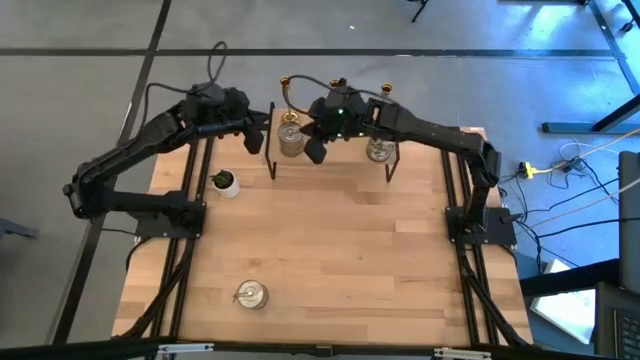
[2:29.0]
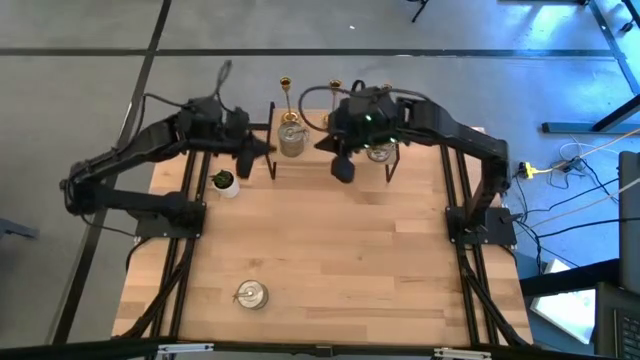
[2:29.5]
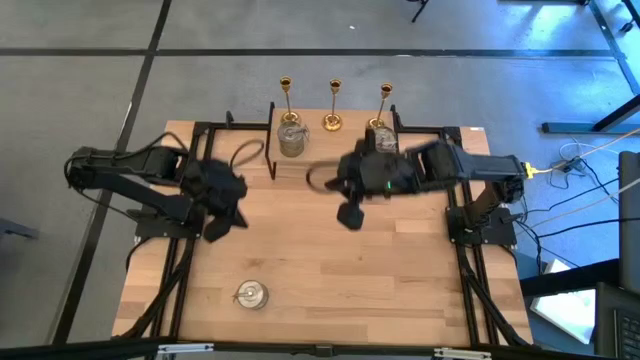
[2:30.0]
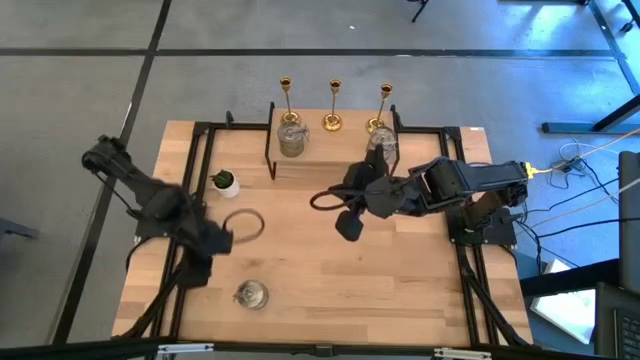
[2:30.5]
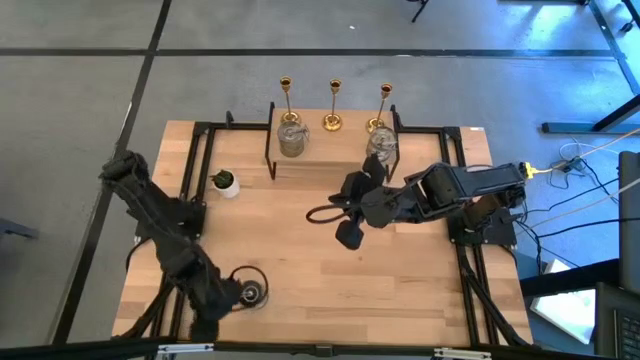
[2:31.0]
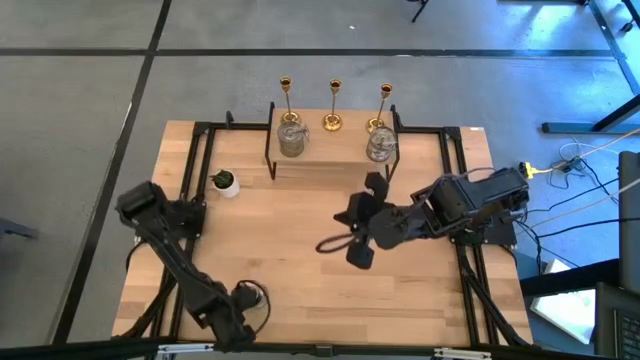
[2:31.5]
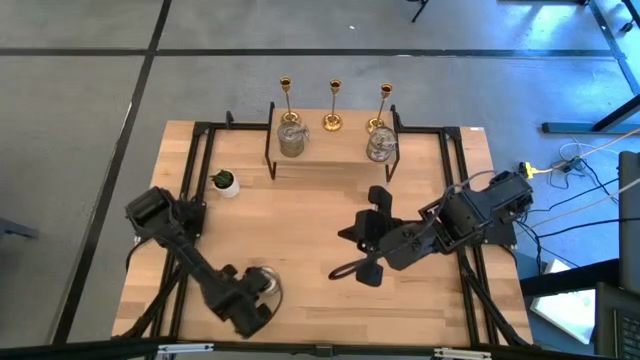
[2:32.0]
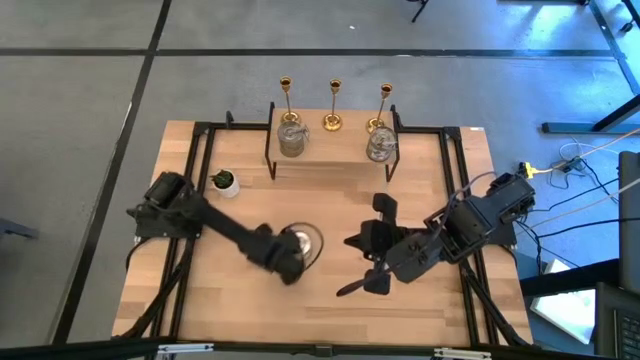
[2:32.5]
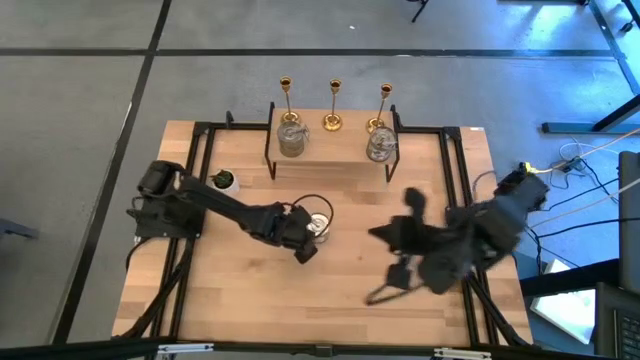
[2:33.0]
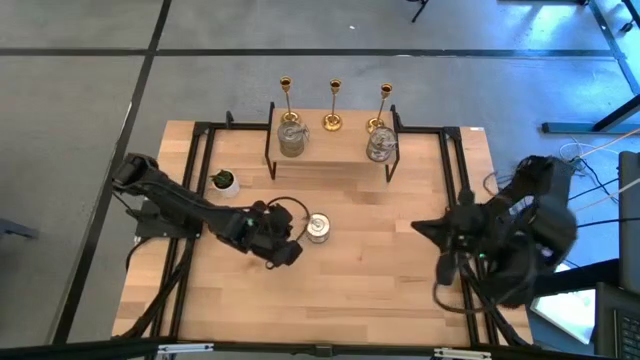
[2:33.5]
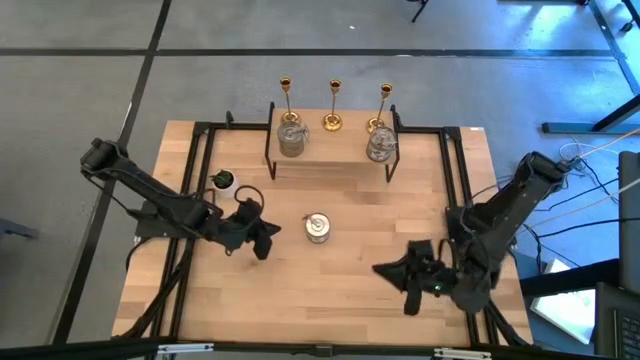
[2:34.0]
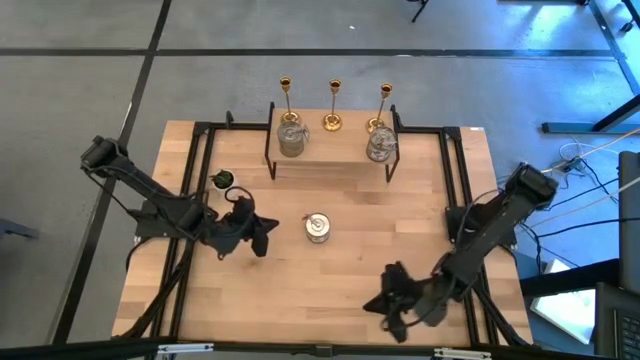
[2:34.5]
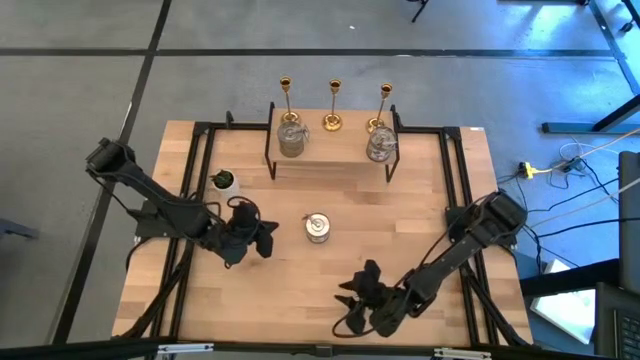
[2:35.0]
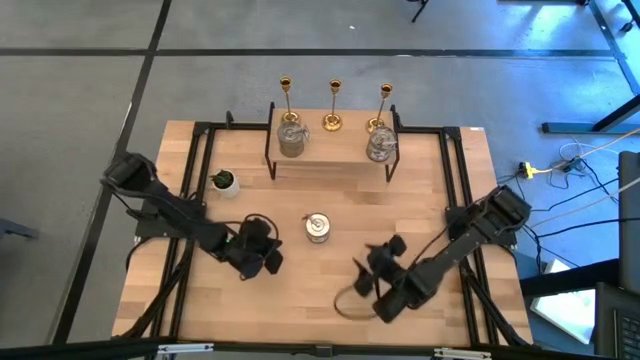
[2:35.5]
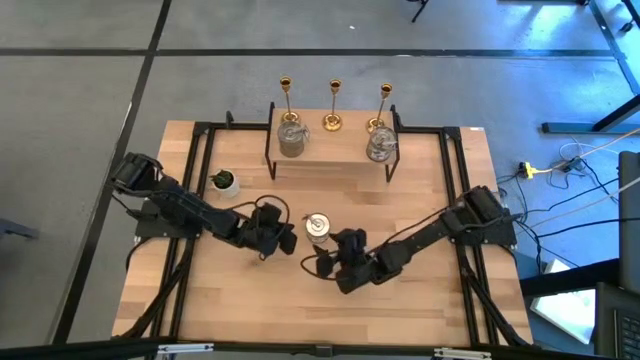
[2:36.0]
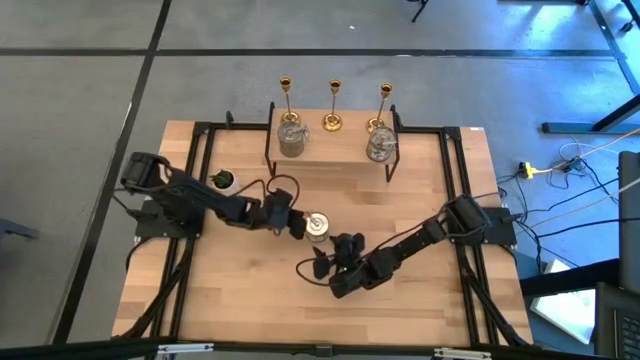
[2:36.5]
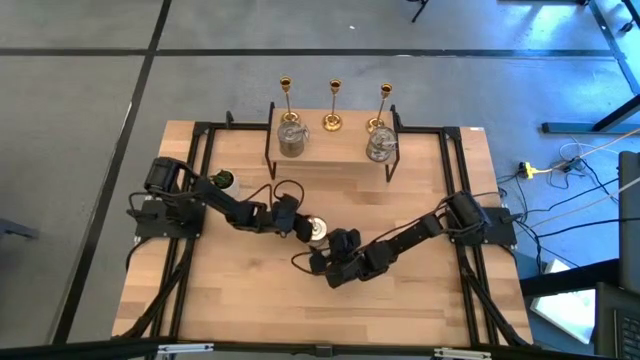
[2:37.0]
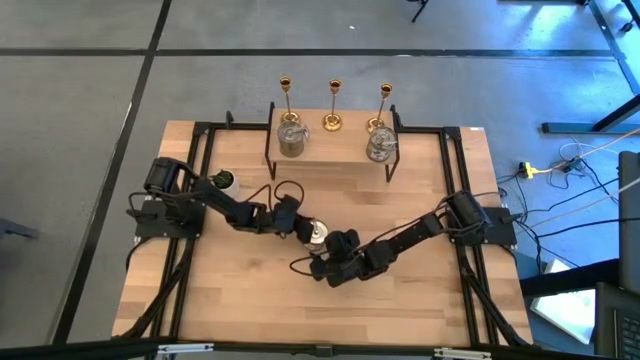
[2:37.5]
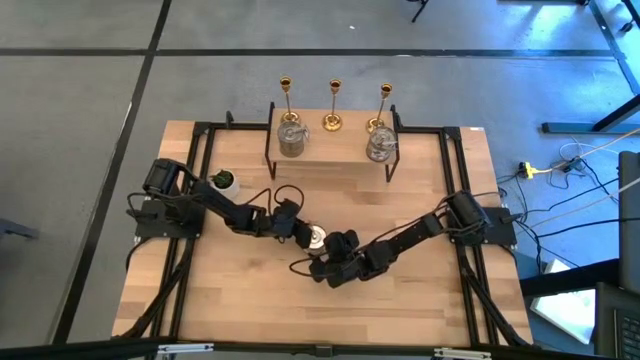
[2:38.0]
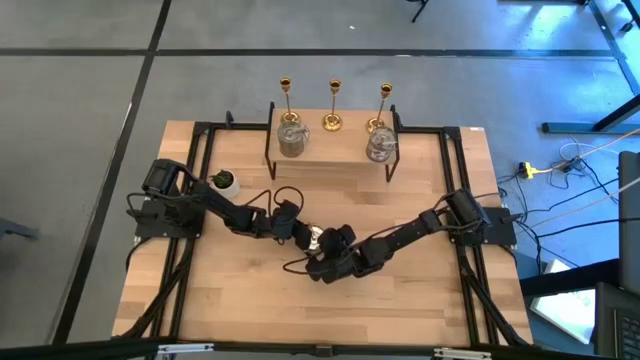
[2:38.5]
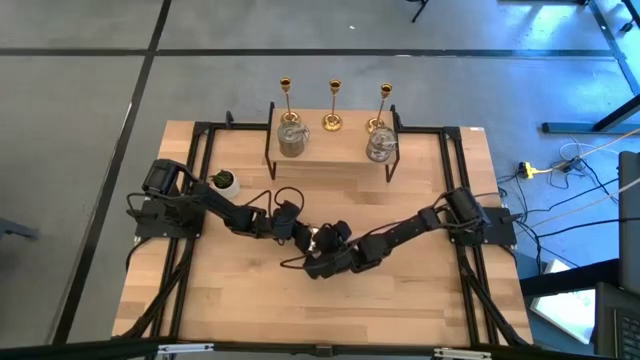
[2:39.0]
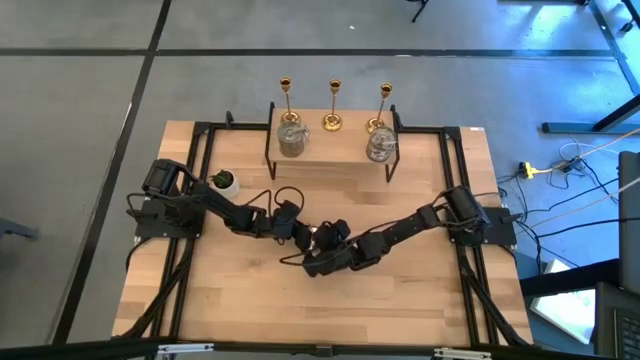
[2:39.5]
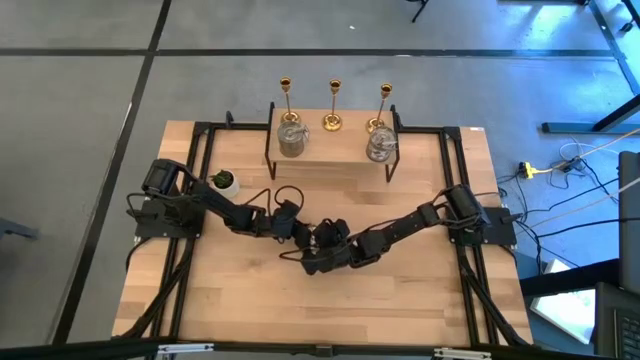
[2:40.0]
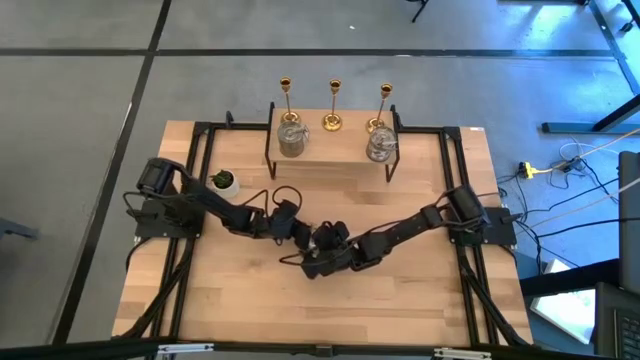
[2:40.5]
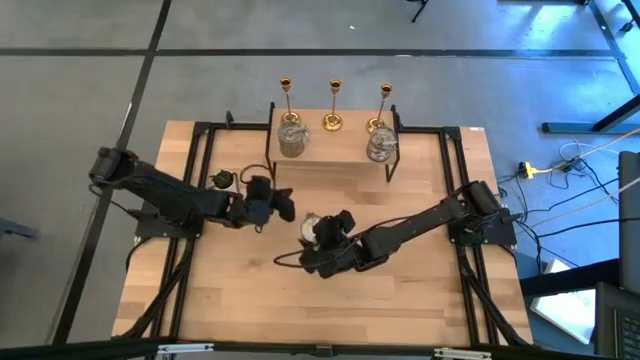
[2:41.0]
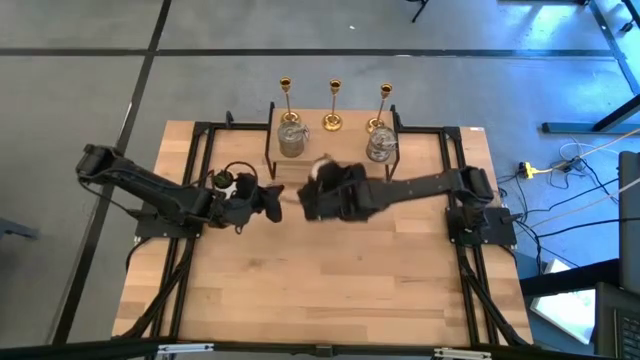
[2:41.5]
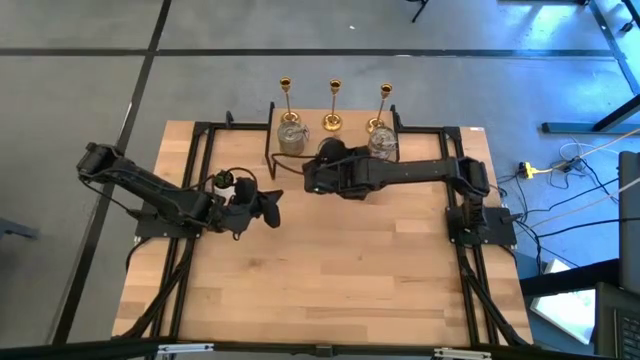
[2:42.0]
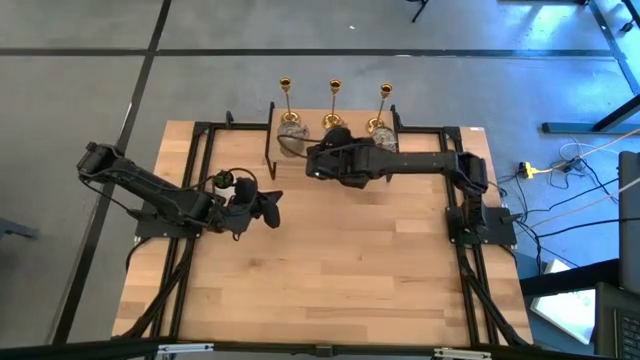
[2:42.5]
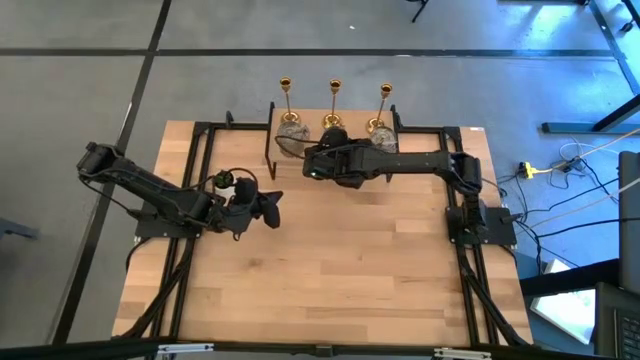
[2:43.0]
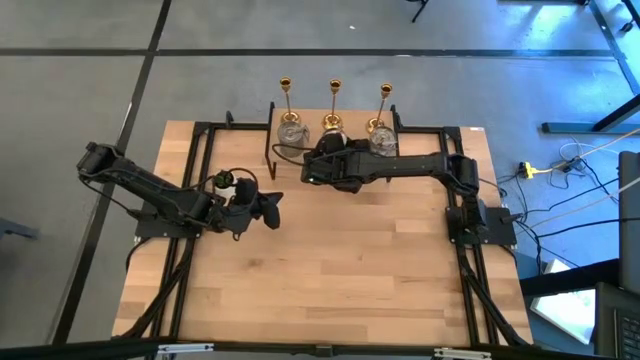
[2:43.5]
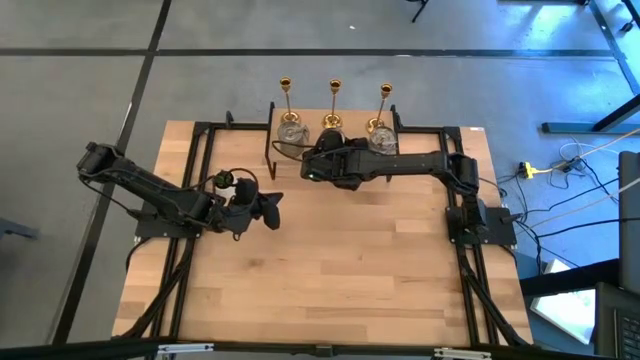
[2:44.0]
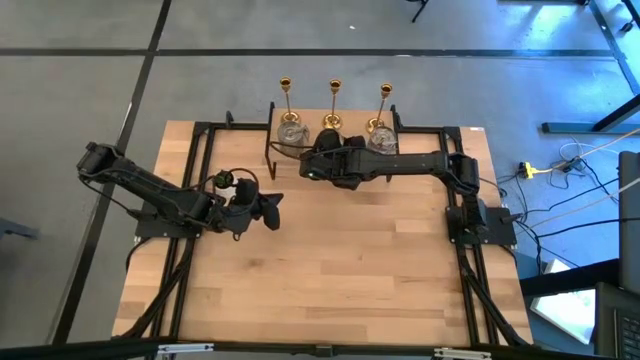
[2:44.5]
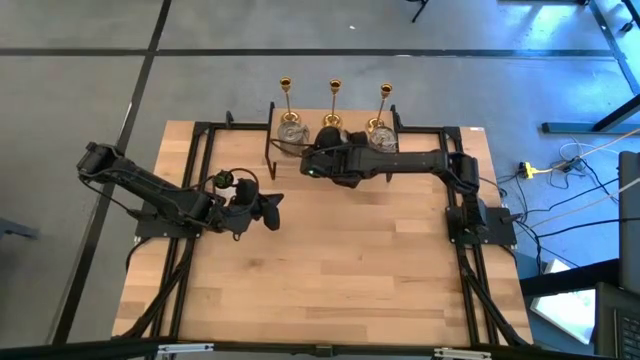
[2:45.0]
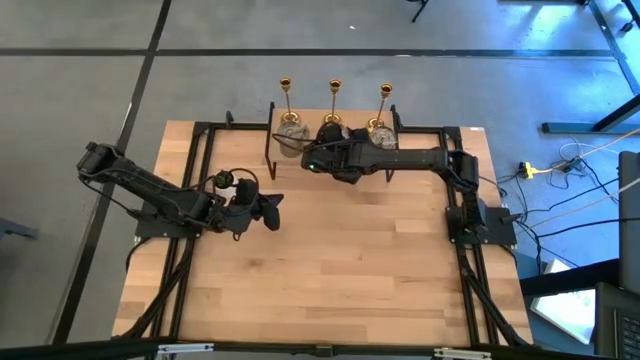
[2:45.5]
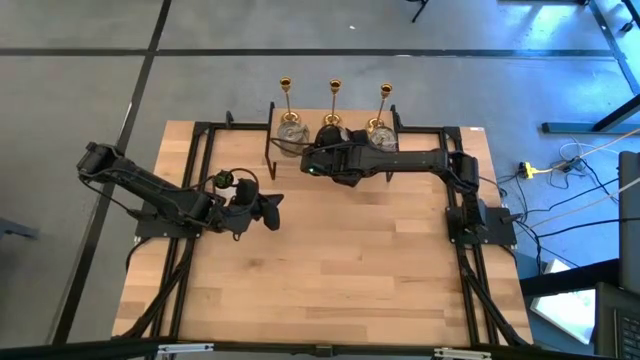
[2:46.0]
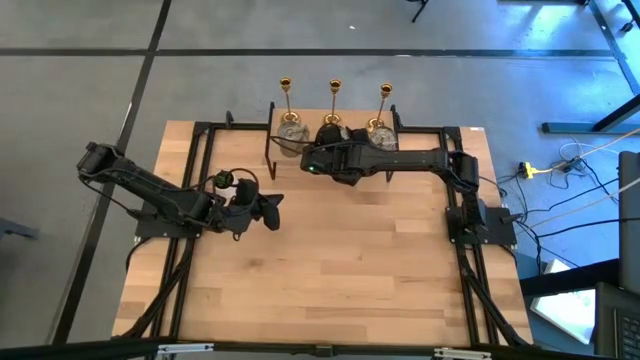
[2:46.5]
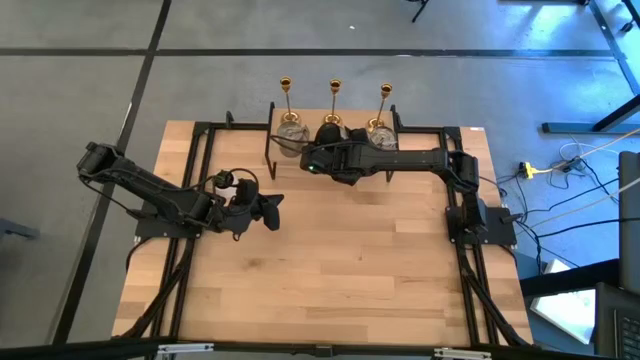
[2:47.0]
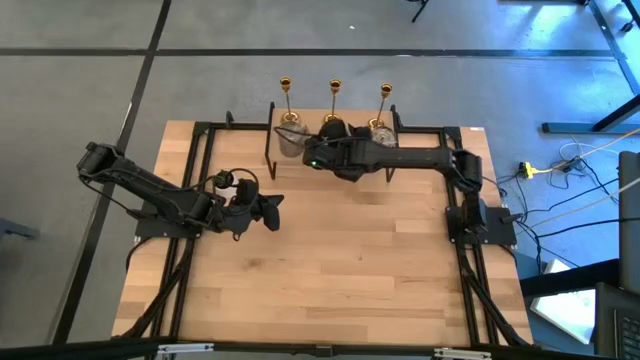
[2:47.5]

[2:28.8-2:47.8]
Task: Pick & Place candle stick holders
Put the silver scented candle on the shelf aligned with the other silver scented candles

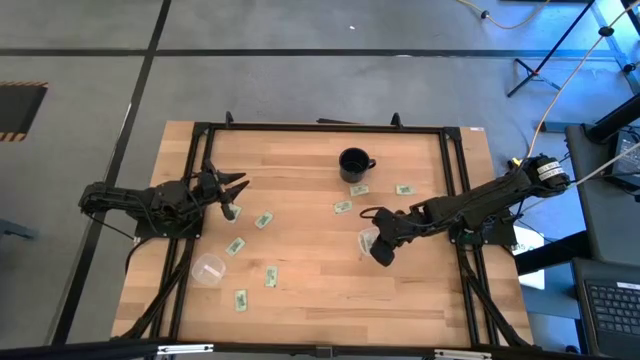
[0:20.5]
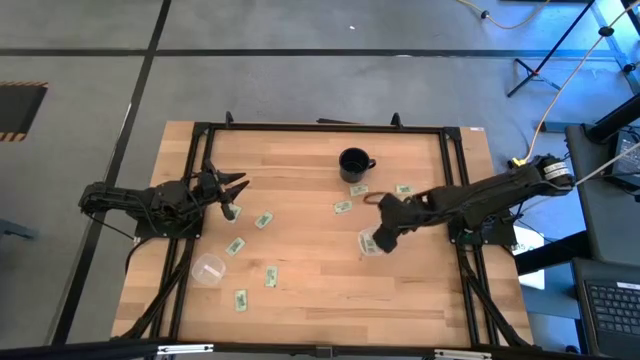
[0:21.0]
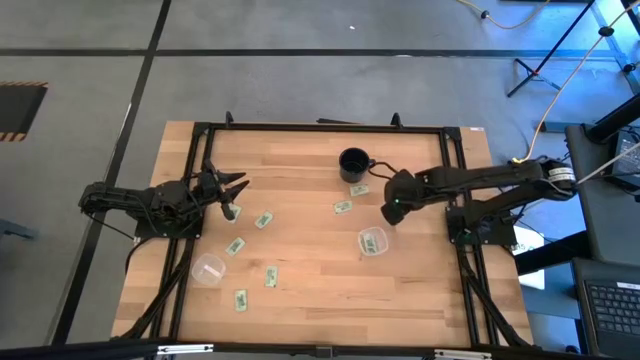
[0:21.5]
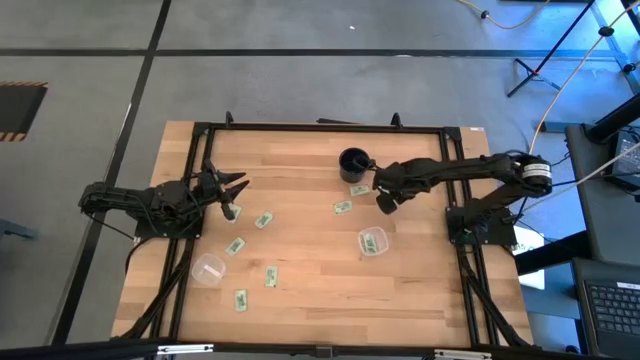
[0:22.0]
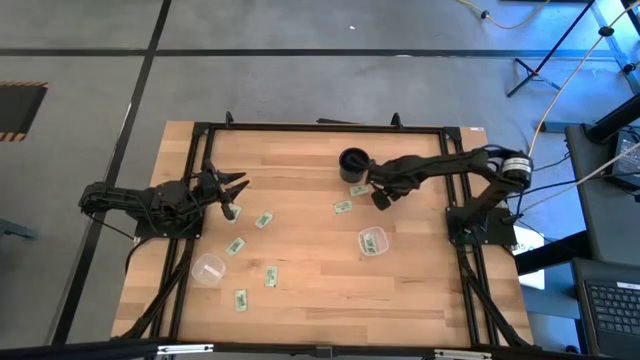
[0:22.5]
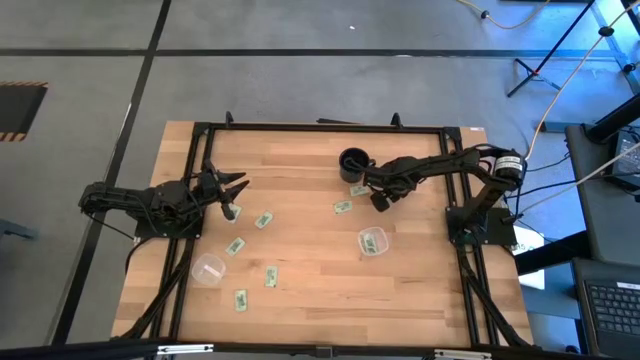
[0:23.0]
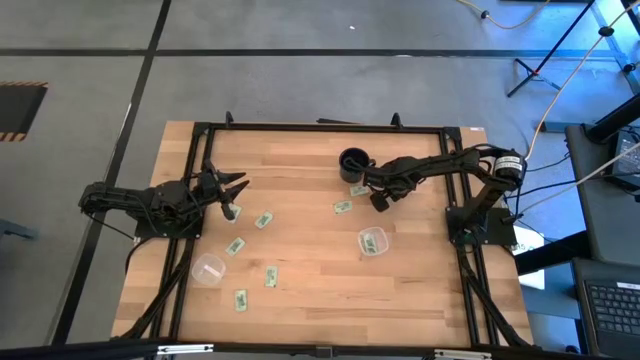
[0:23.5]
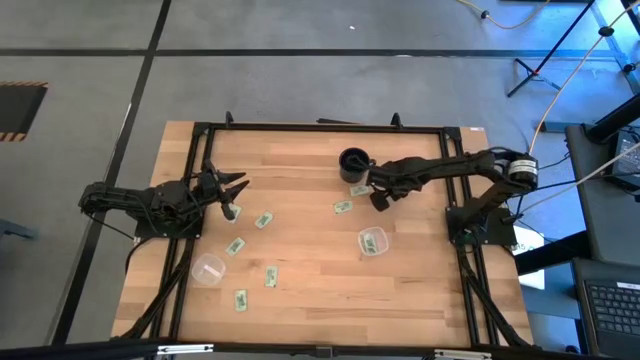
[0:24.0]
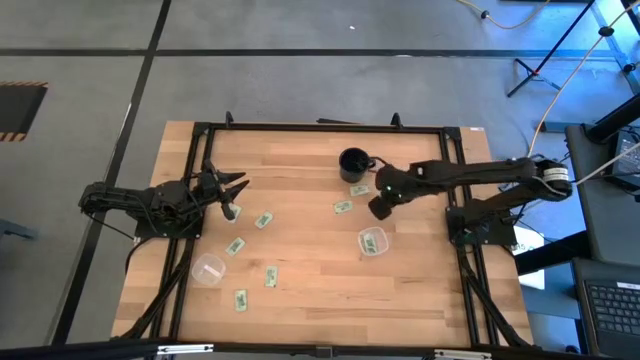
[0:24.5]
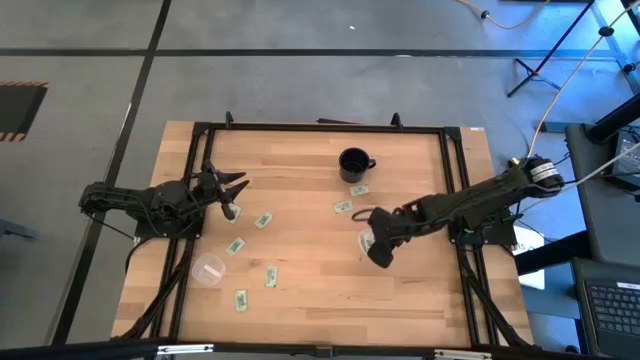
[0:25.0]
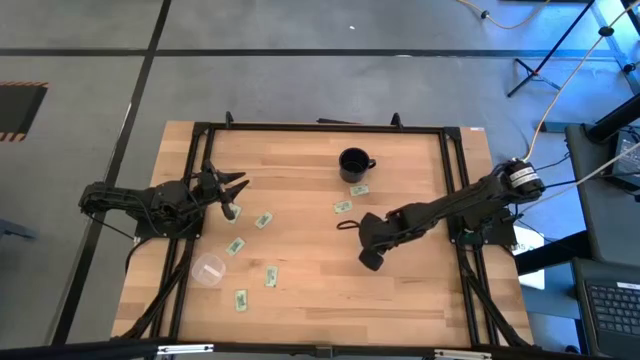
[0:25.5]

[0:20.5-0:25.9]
Task: Pick and place Stevia / Truvia into bins
Put the stevia packet into the right transparent container
